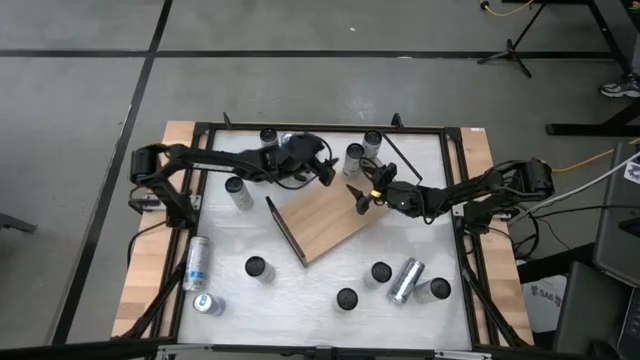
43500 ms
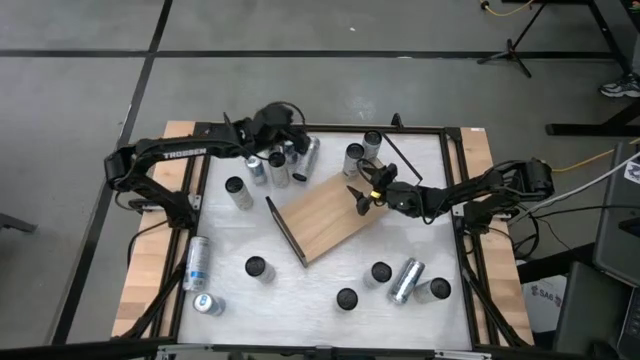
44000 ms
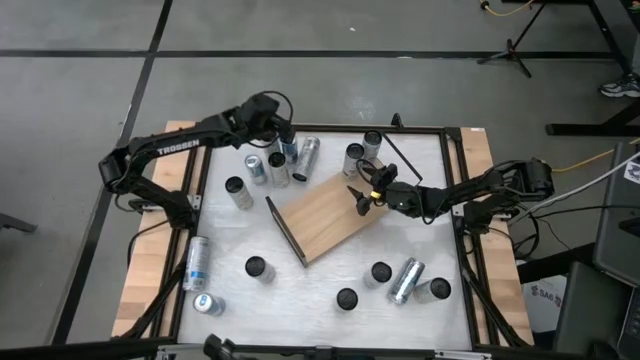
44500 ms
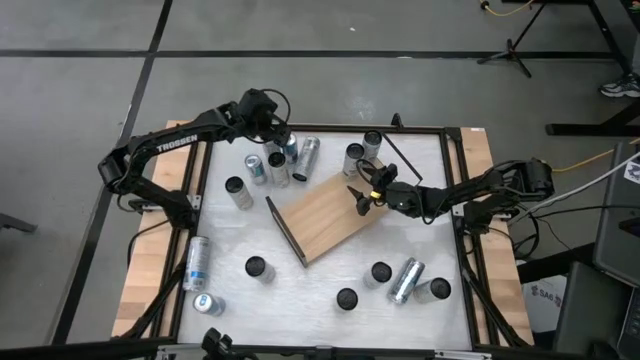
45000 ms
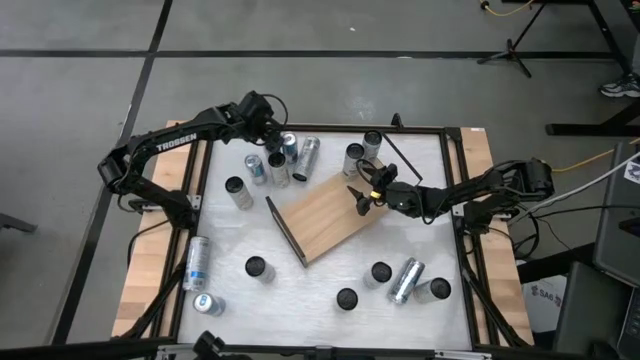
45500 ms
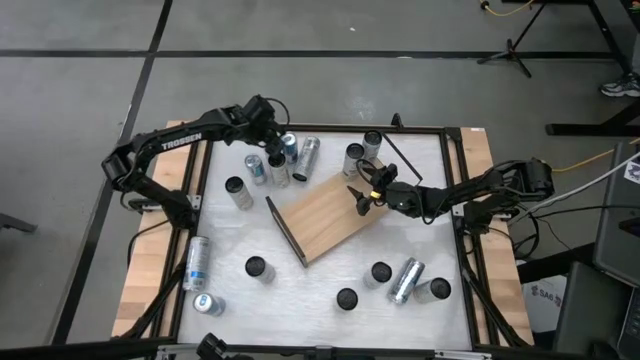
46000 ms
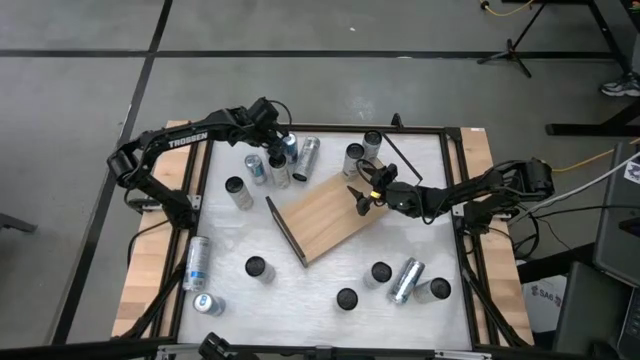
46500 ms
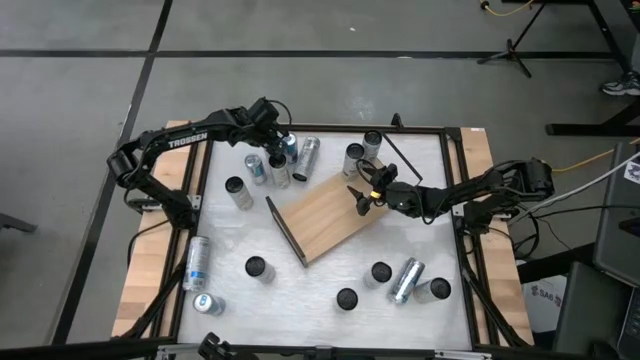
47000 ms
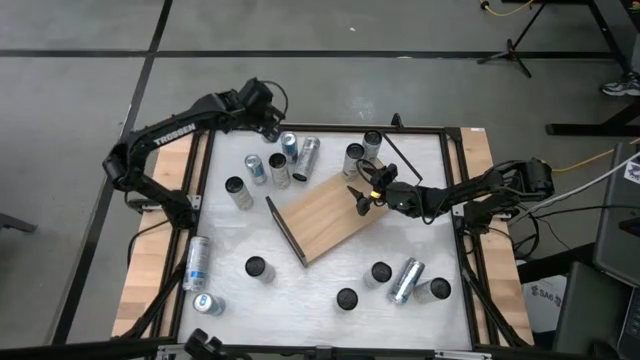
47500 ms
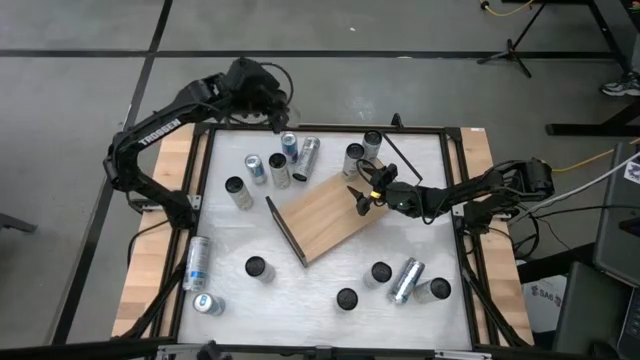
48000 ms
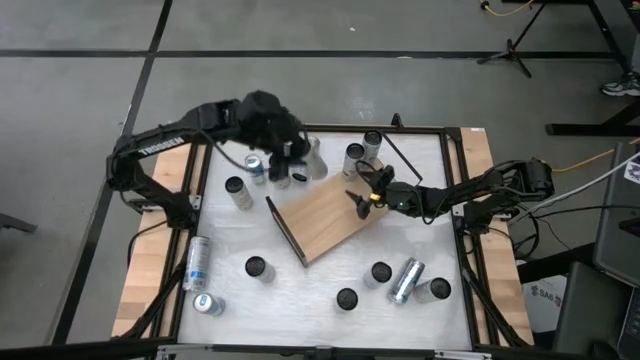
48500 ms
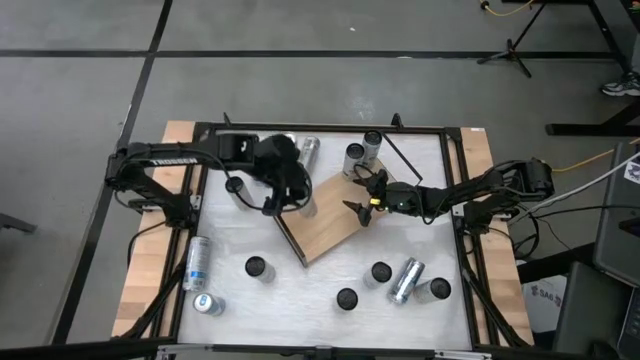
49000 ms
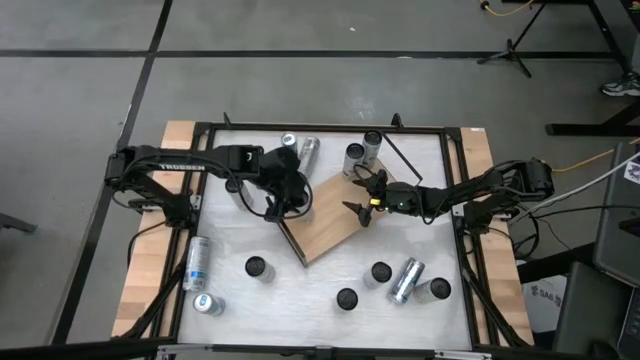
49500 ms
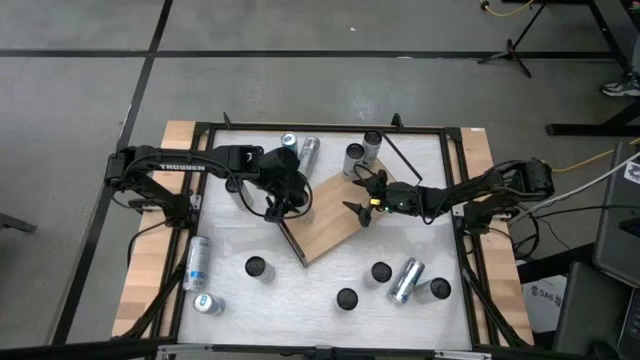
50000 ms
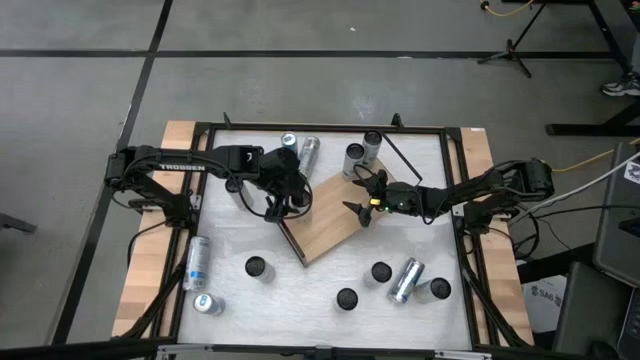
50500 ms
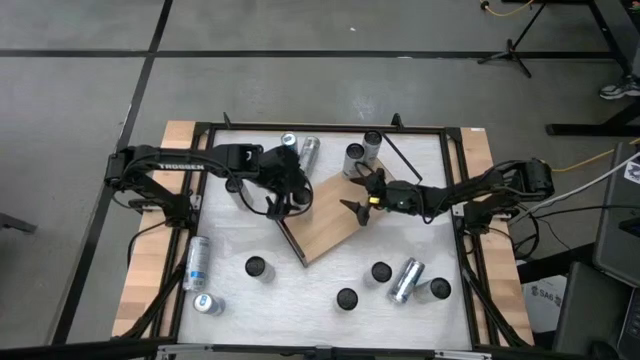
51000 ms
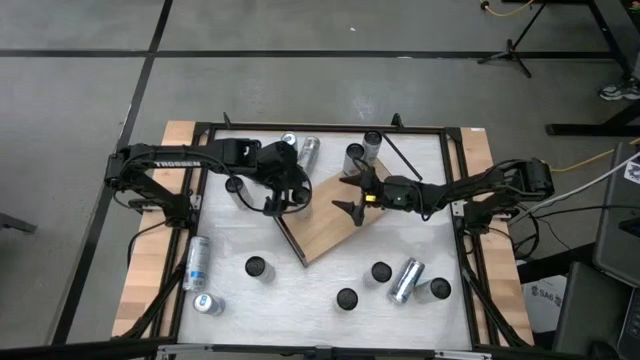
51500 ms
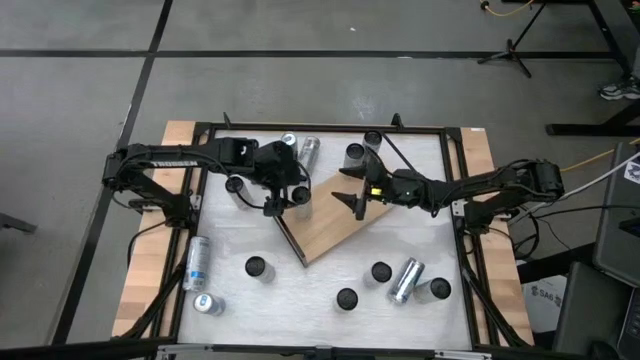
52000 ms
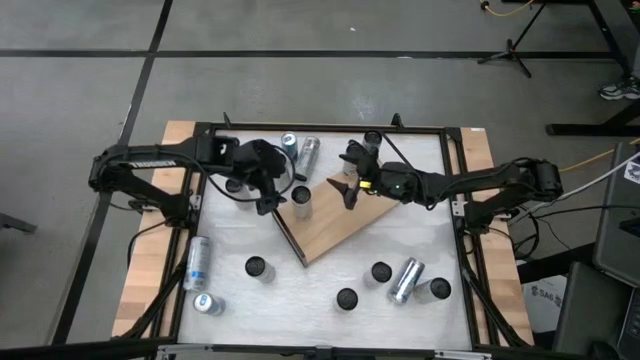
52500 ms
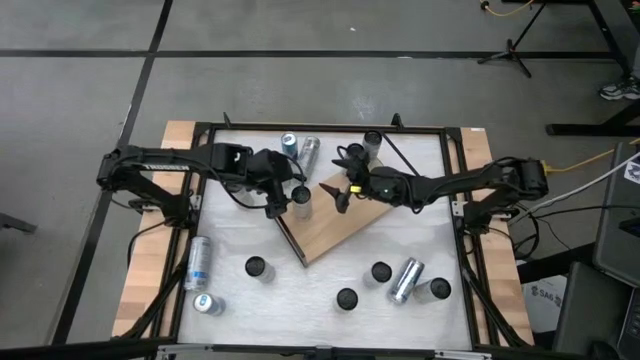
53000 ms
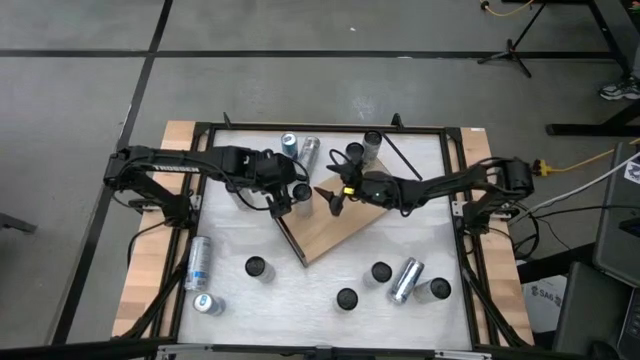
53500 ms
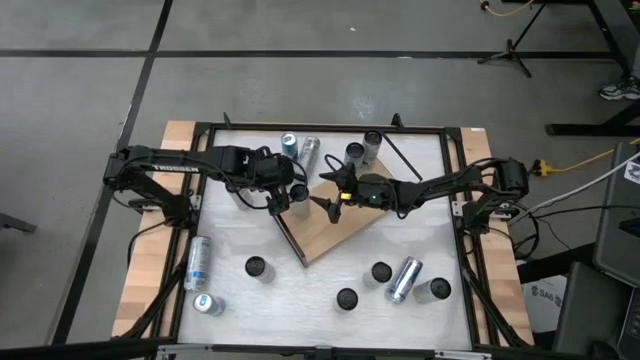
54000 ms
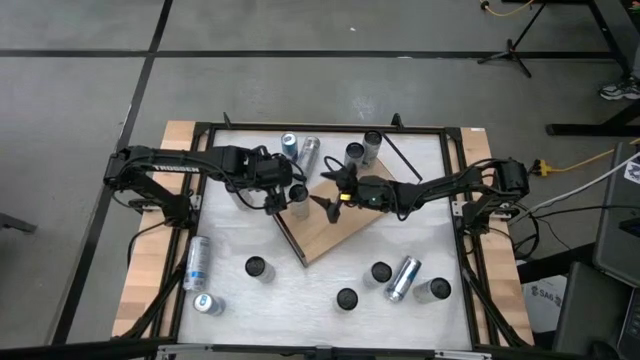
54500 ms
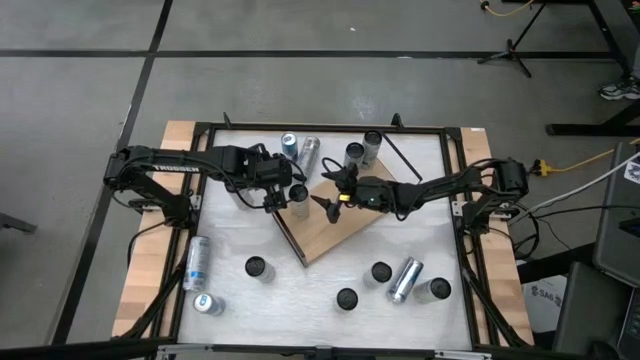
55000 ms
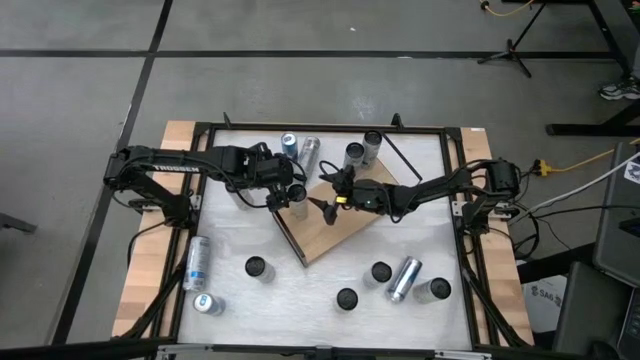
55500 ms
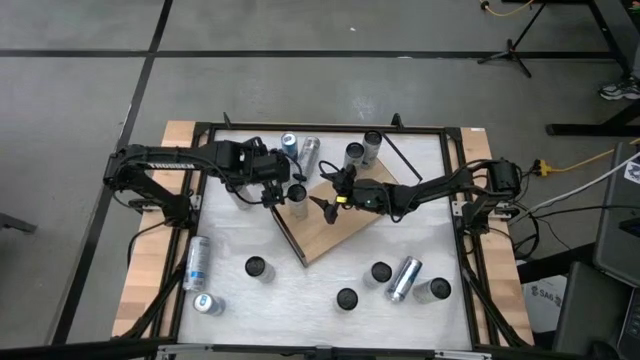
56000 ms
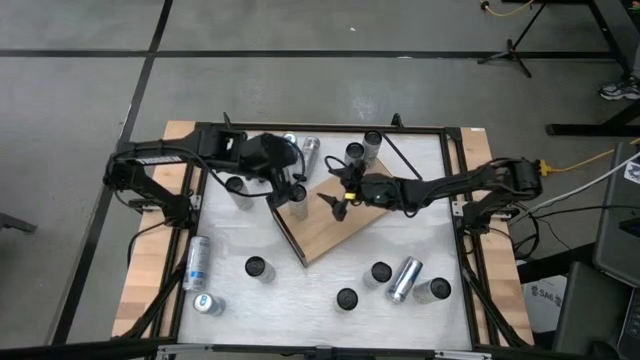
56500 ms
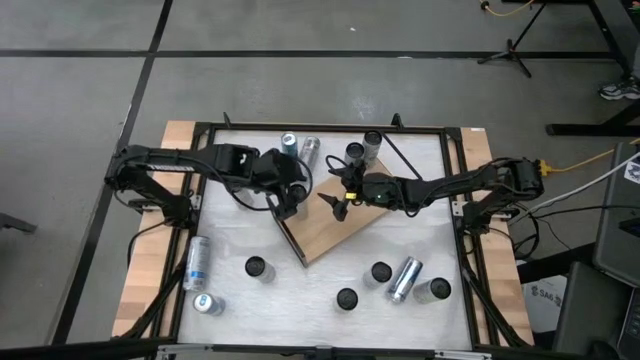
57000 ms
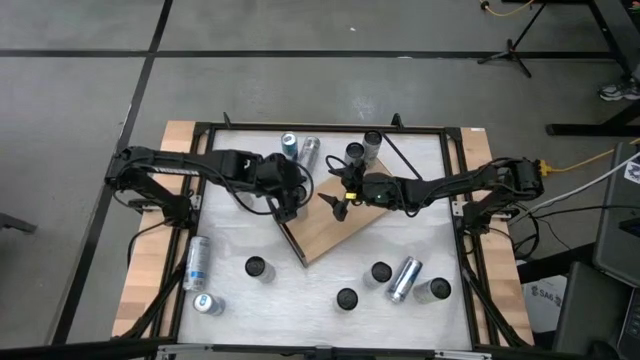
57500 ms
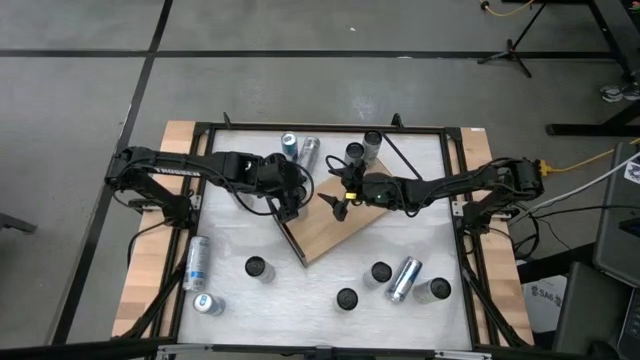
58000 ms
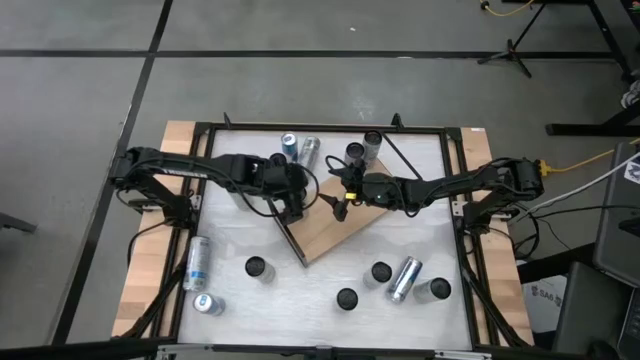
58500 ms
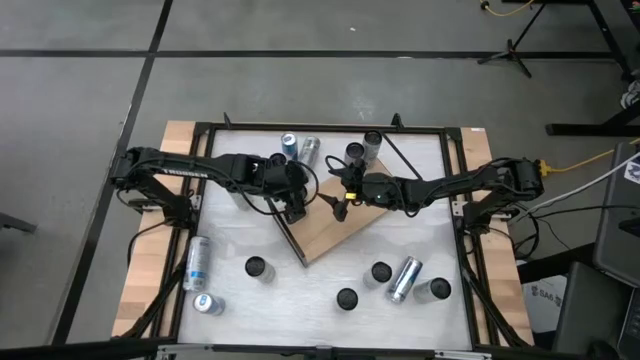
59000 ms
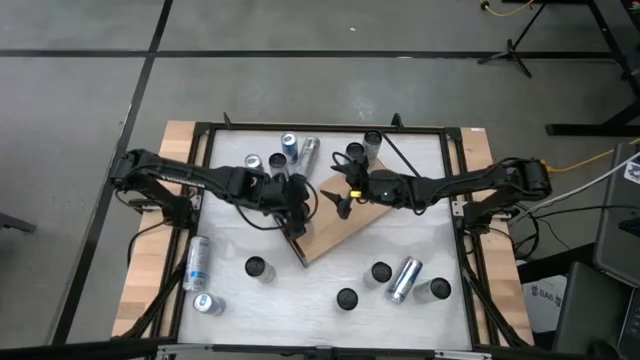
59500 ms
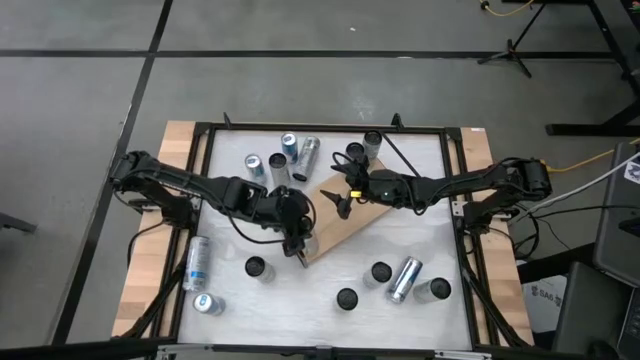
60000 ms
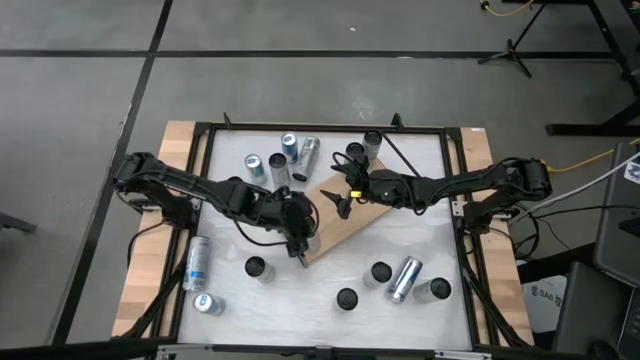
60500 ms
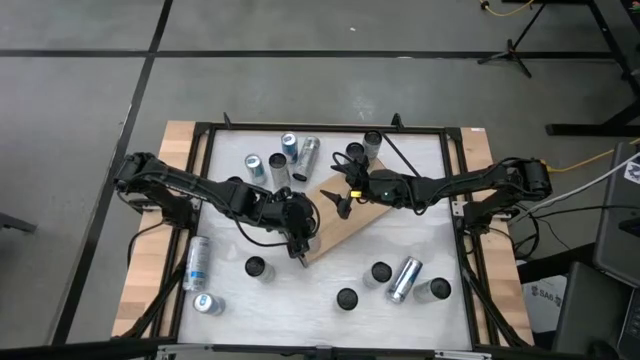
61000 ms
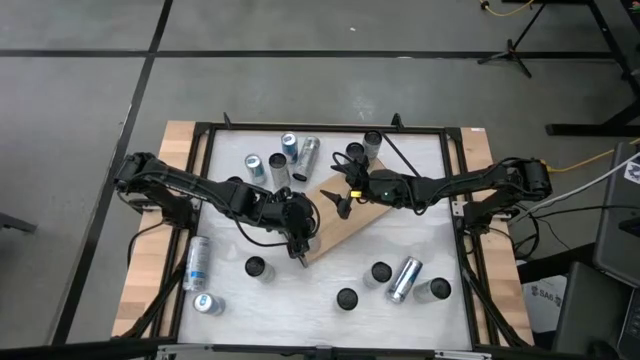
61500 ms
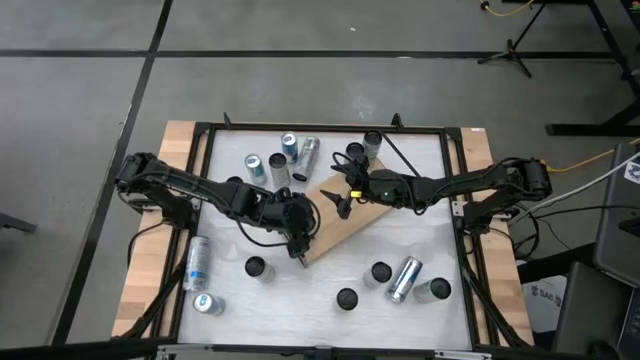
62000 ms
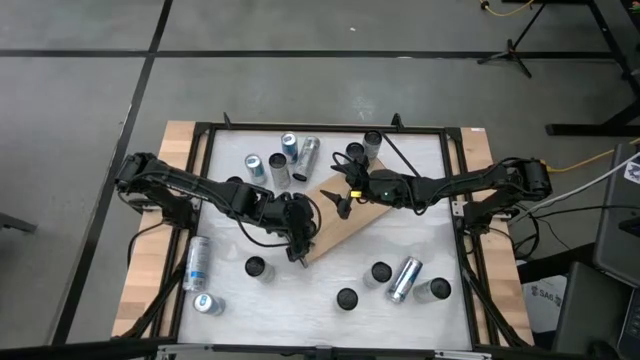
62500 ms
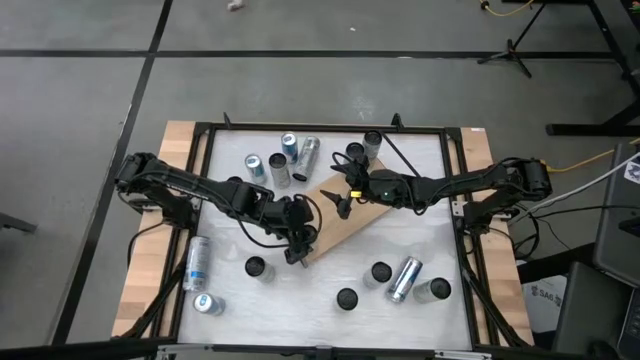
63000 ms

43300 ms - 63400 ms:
Task: Place canned beverage on shelf
Put the white yellow soda can on the shelf
